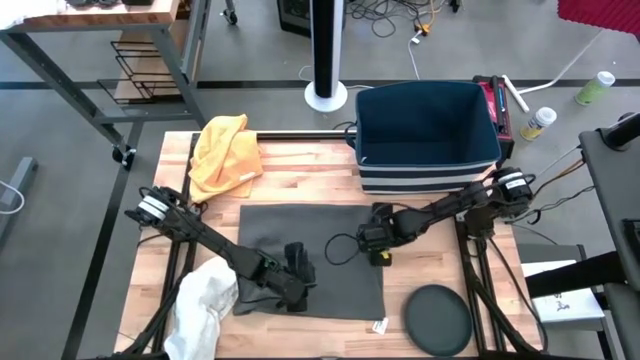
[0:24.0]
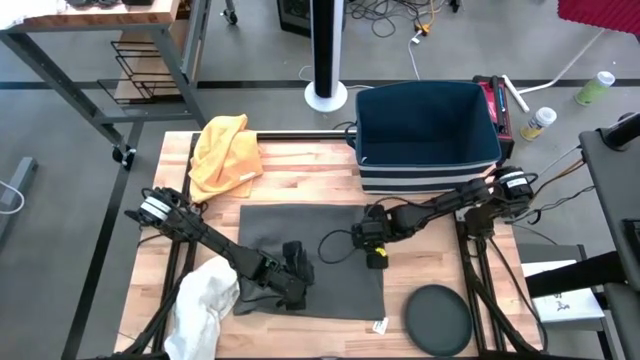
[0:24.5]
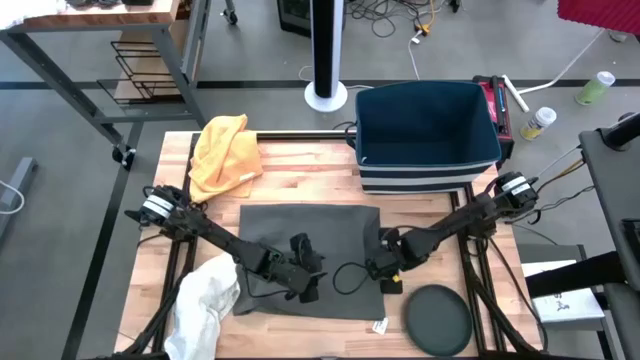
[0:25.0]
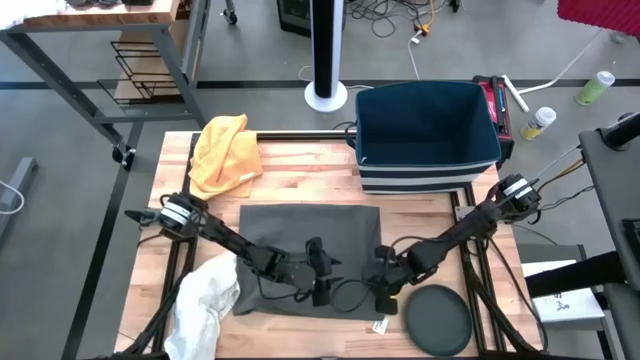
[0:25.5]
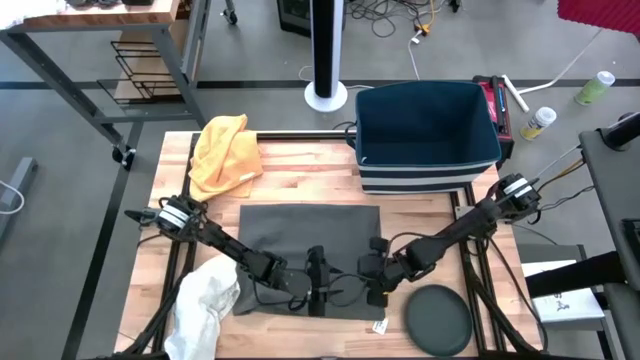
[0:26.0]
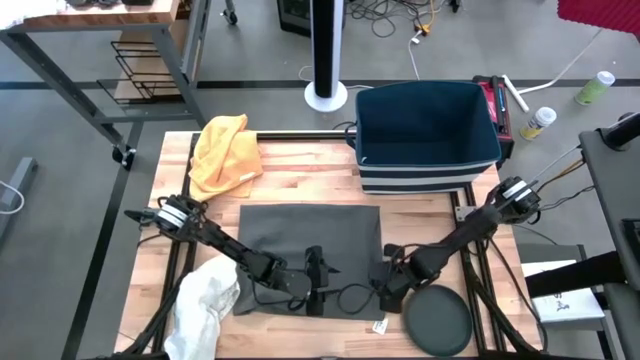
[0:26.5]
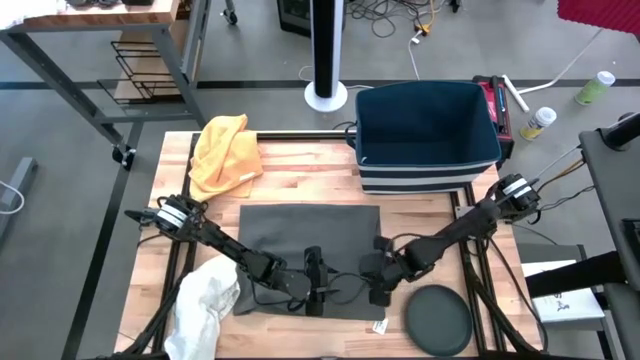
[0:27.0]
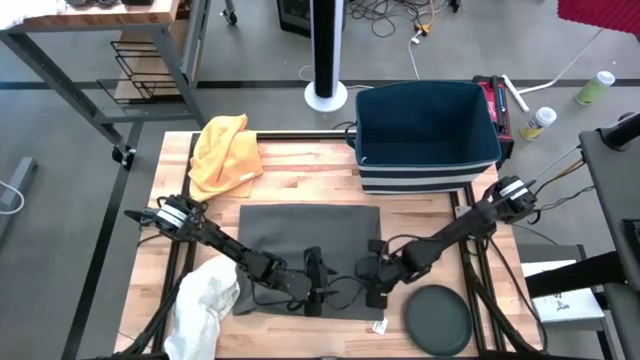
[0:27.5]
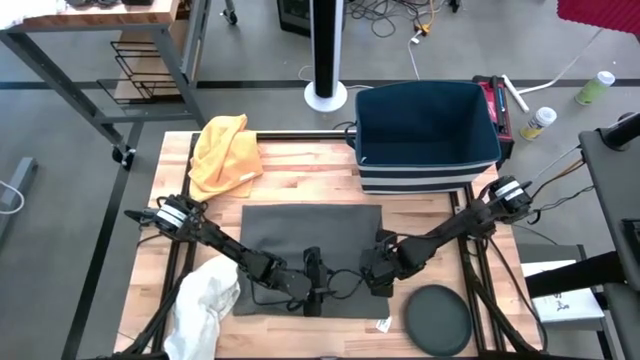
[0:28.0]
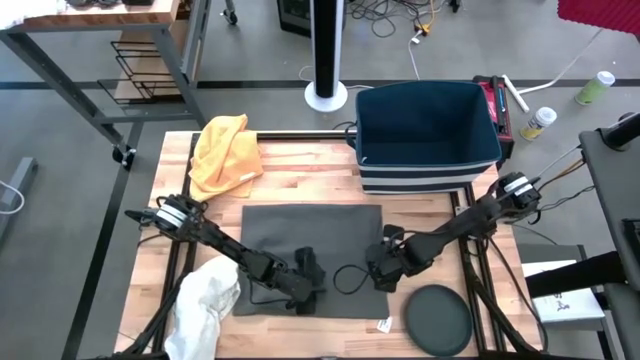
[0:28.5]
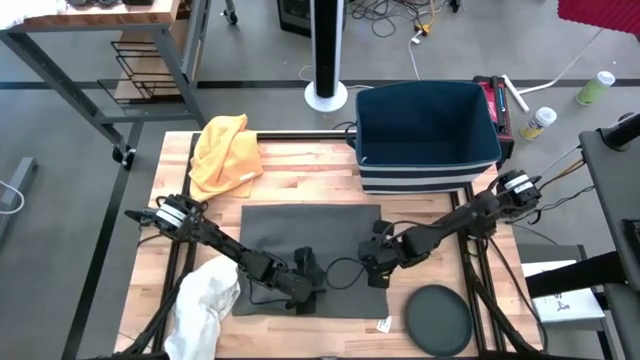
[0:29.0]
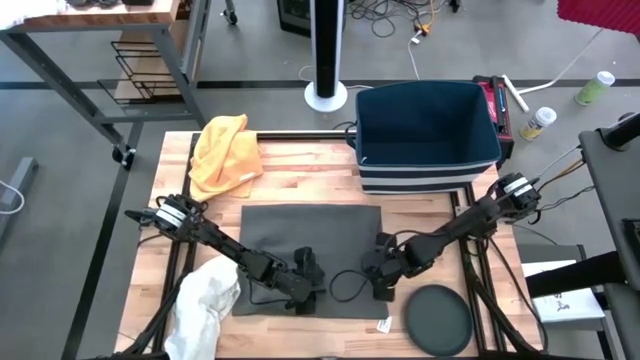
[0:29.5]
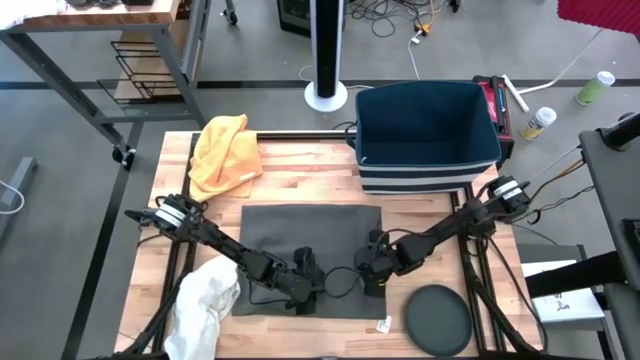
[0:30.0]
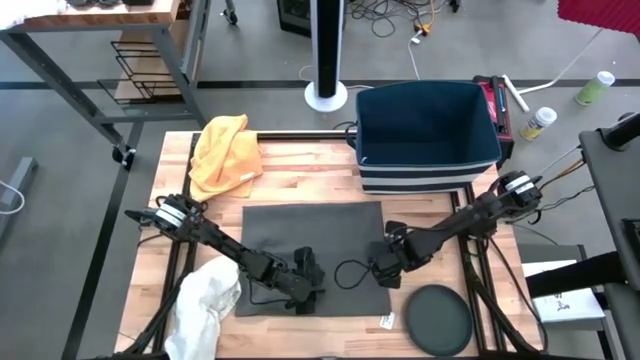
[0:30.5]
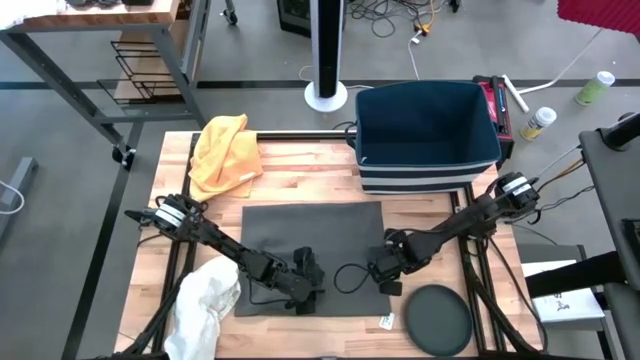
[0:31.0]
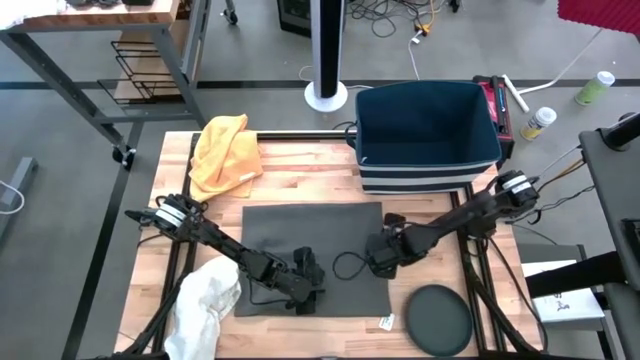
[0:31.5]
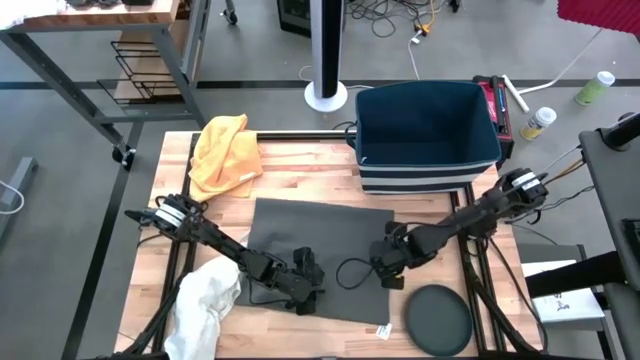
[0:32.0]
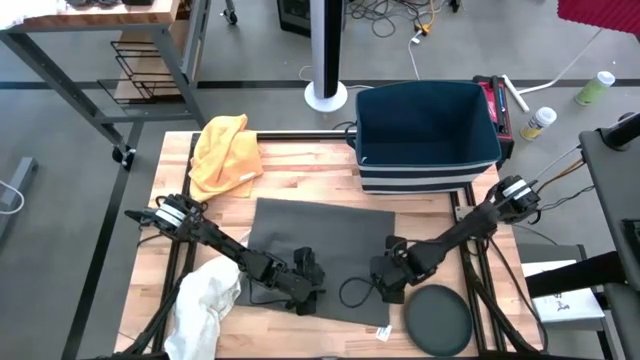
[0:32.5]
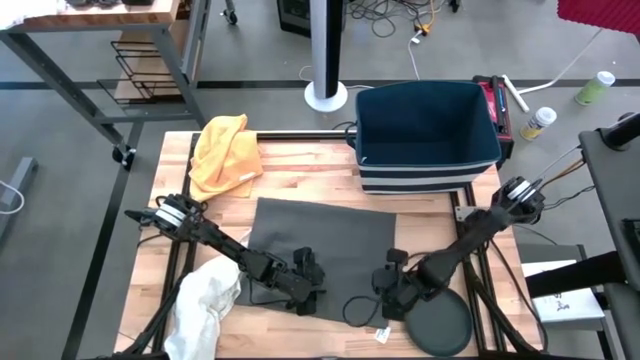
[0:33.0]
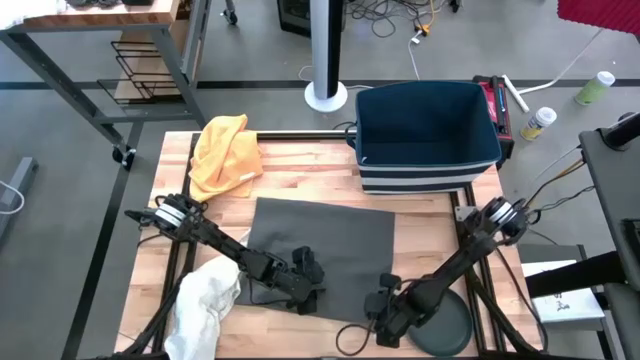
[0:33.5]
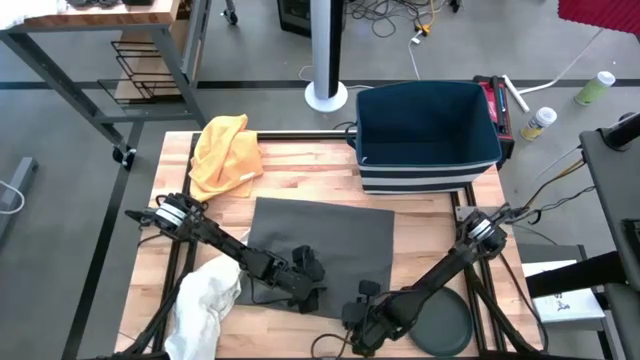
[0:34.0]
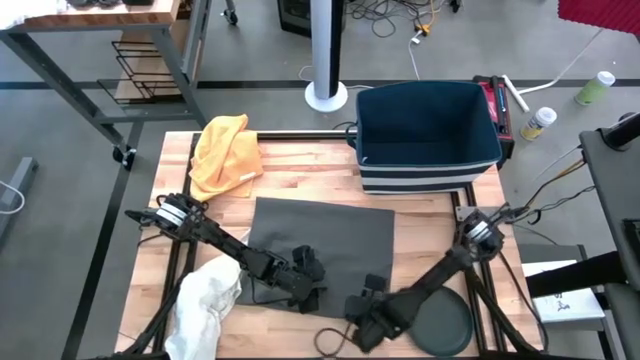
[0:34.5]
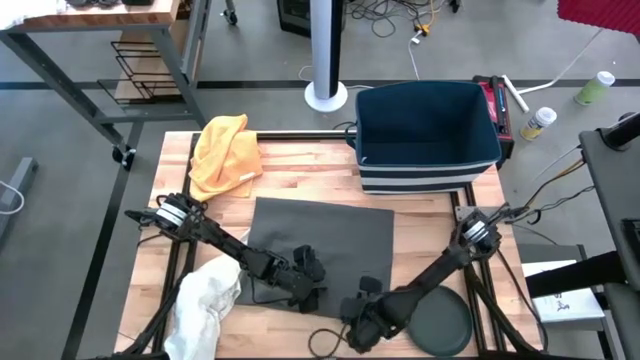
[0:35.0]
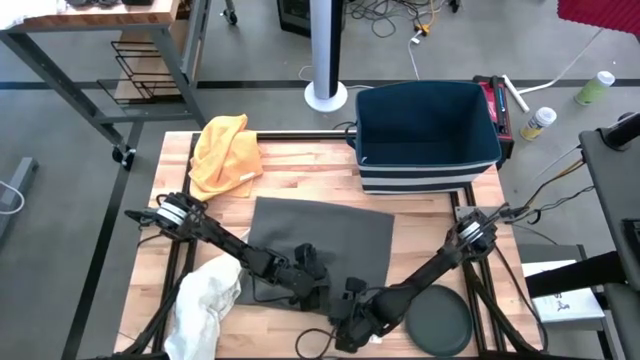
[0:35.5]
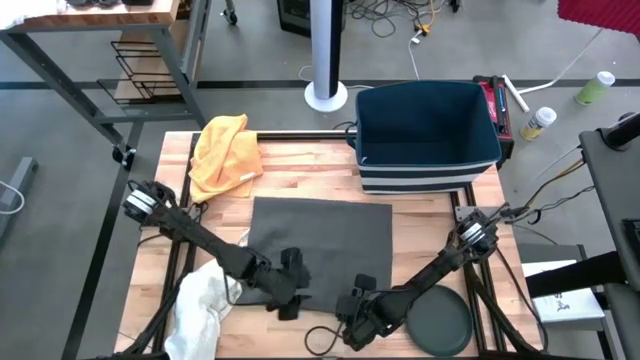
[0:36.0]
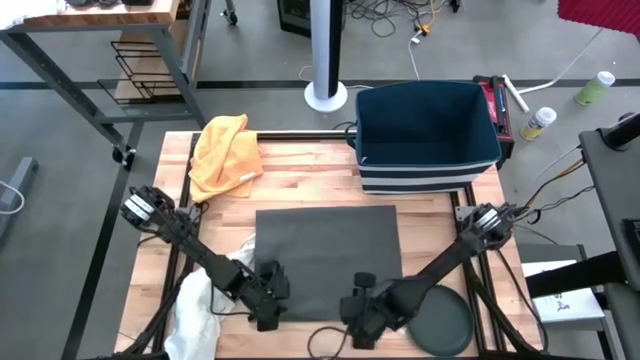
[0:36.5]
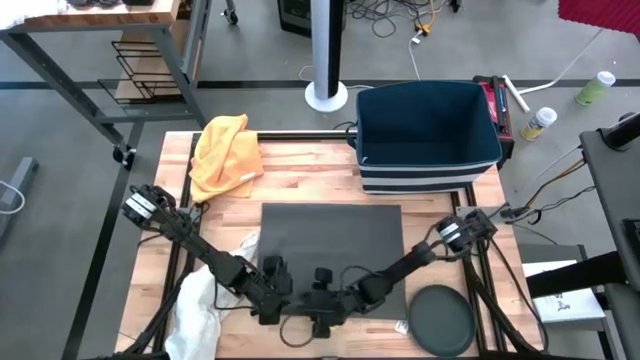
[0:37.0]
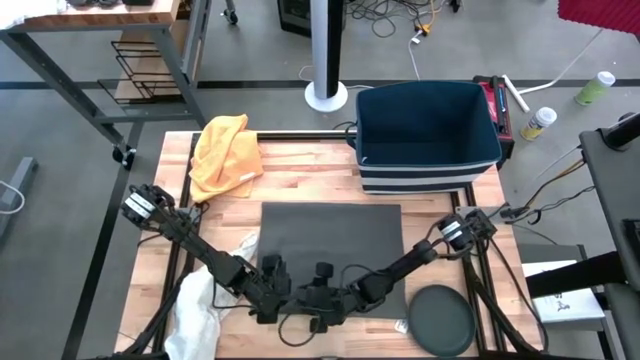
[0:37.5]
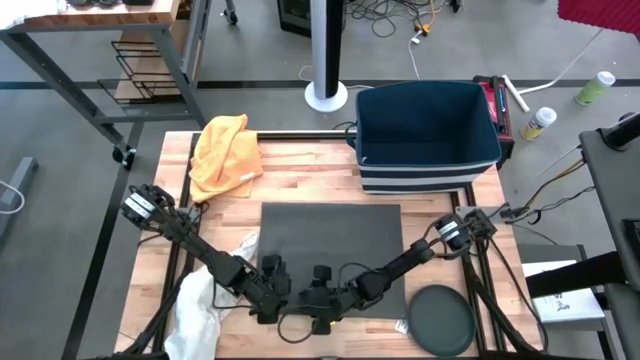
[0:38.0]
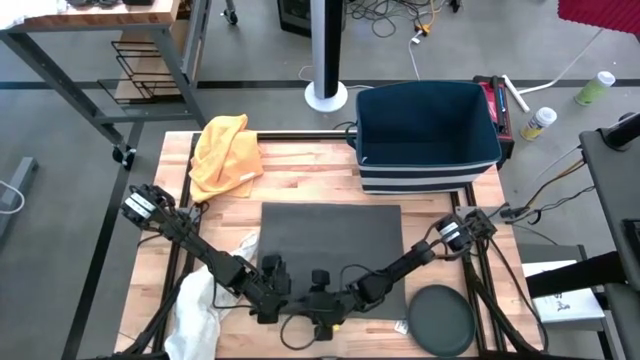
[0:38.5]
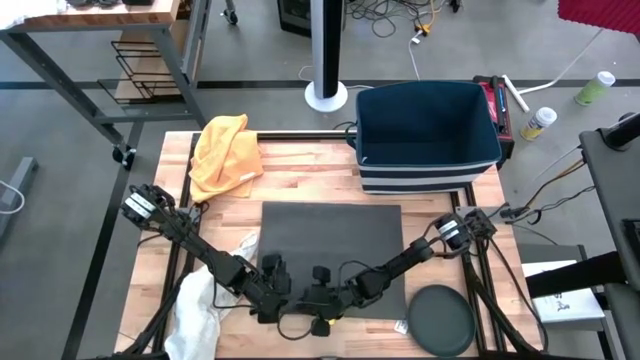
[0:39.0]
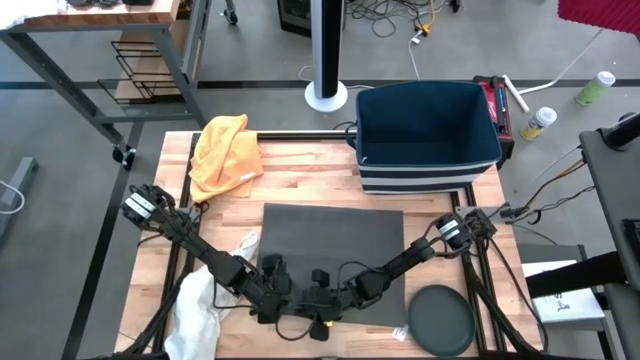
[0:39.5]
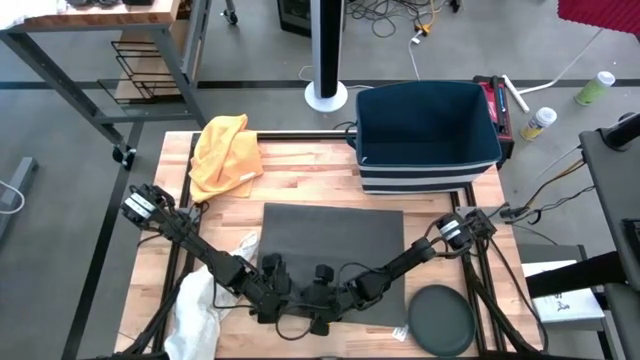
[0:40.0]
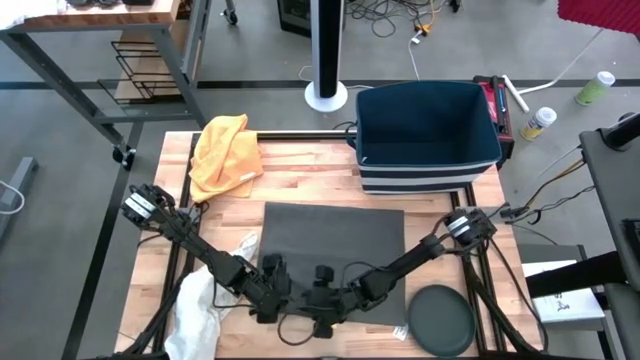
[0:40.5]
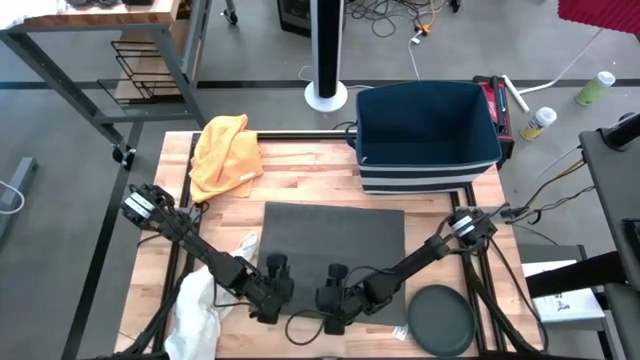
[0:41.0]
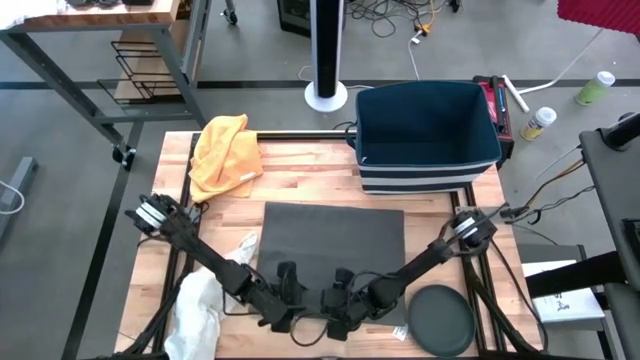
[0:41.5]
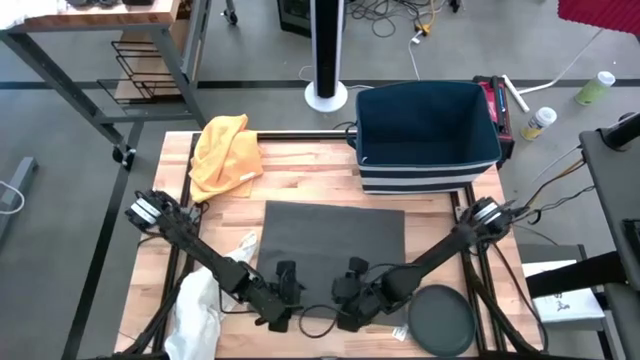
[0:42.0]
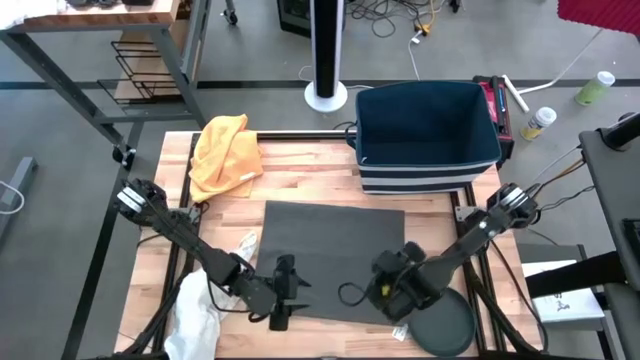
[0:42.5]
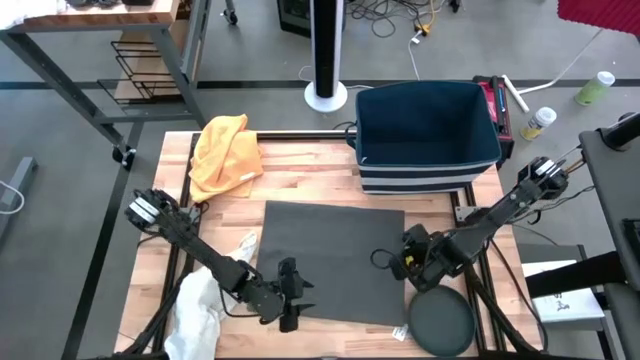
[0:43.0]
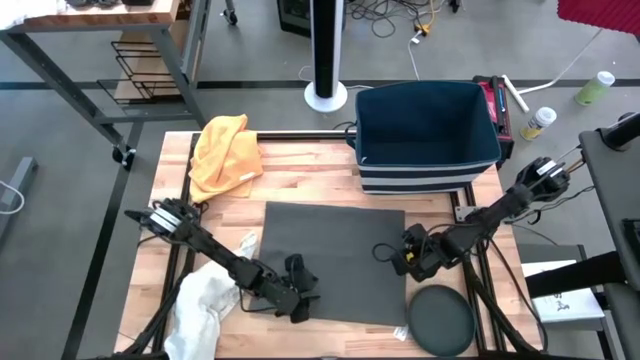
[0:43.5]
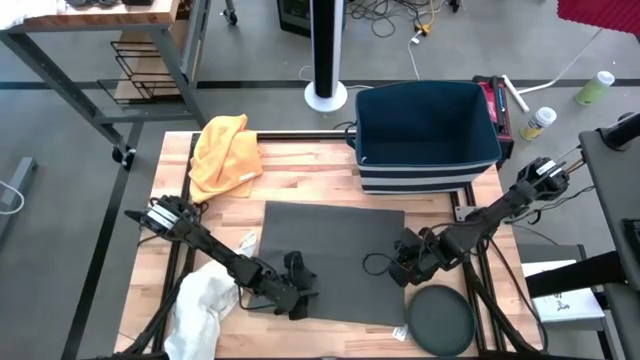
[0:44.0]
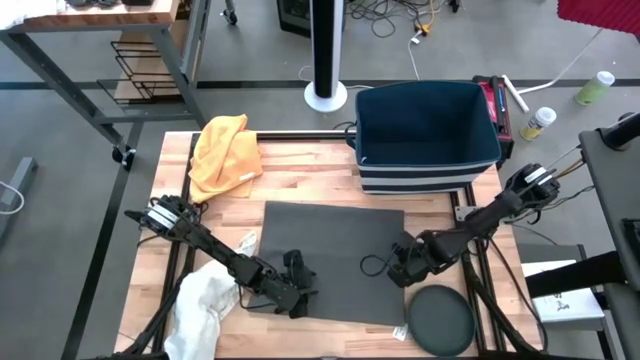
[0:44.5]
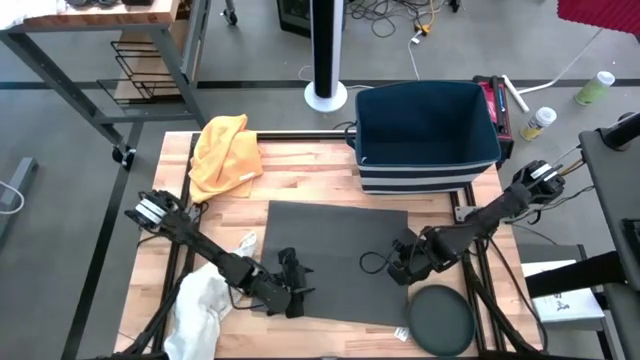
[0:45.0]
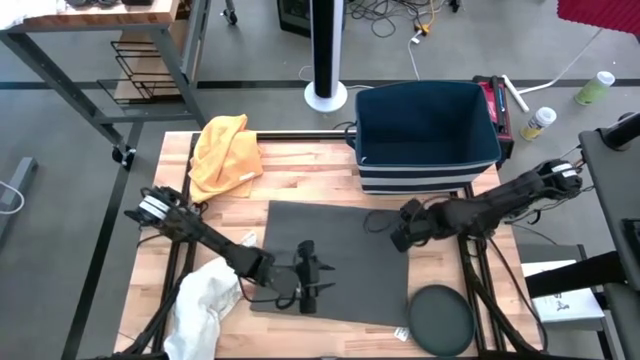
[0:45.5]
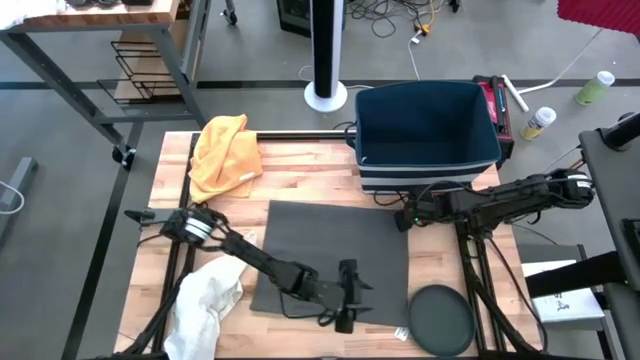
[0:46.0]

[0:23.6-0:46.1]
Task: Fold kitchen towel into neat rectangle
Fold the gray towel
